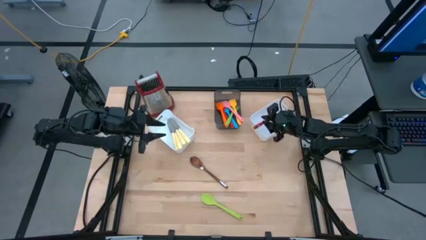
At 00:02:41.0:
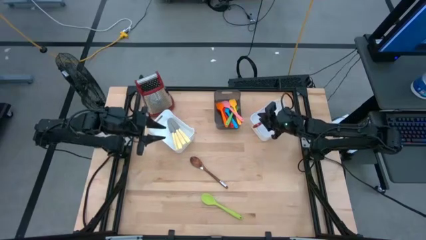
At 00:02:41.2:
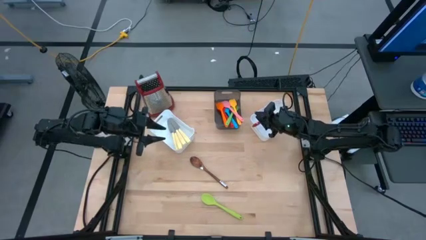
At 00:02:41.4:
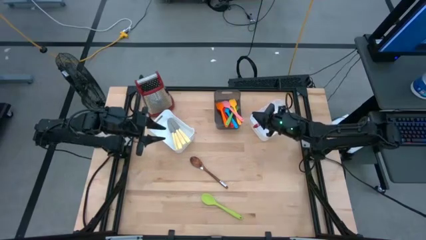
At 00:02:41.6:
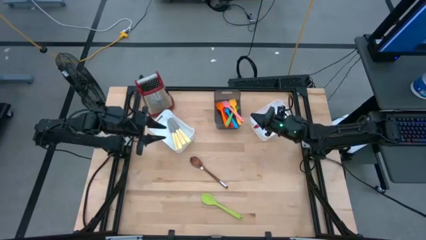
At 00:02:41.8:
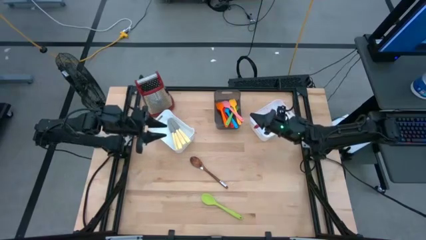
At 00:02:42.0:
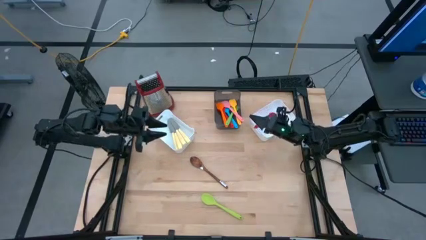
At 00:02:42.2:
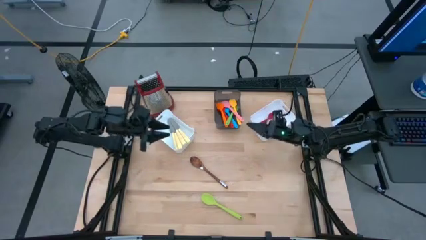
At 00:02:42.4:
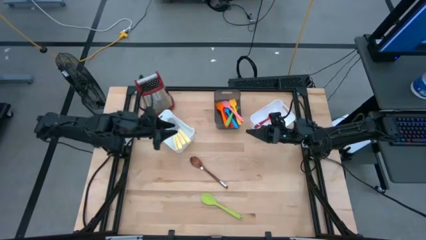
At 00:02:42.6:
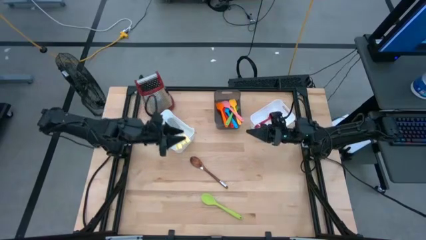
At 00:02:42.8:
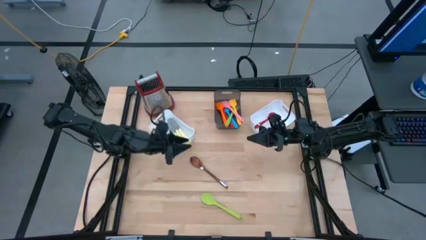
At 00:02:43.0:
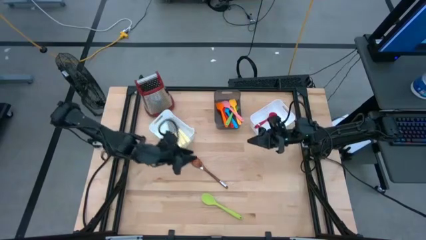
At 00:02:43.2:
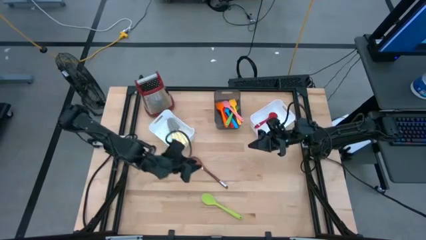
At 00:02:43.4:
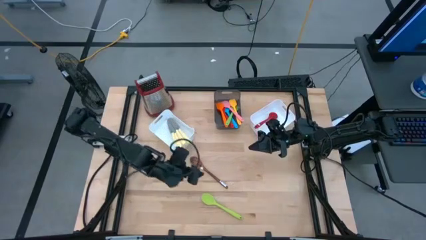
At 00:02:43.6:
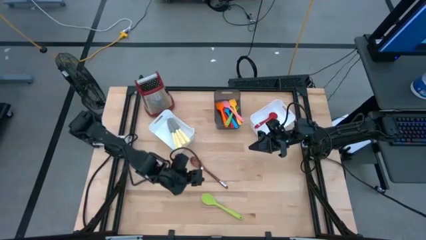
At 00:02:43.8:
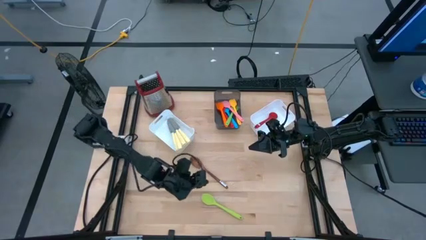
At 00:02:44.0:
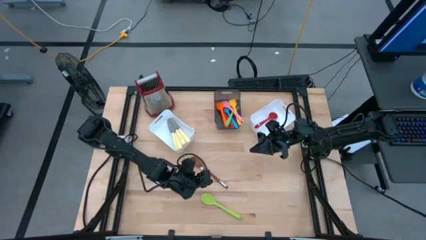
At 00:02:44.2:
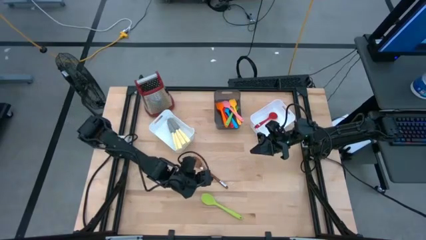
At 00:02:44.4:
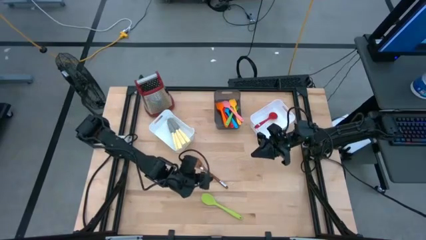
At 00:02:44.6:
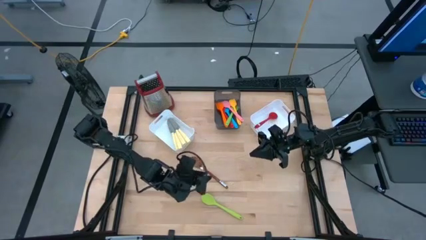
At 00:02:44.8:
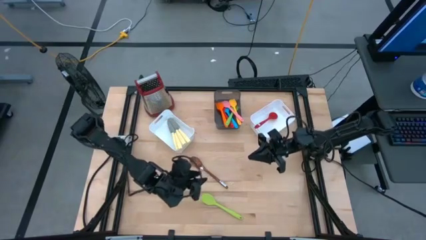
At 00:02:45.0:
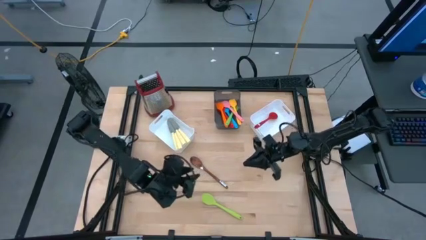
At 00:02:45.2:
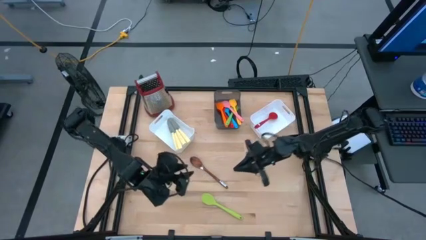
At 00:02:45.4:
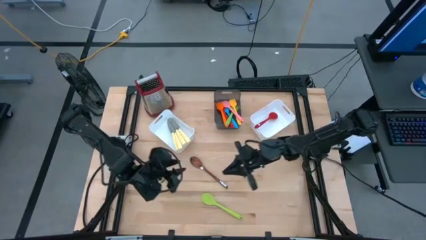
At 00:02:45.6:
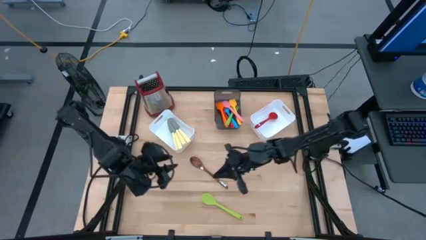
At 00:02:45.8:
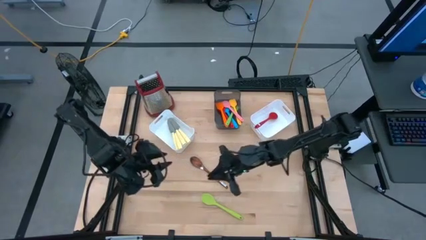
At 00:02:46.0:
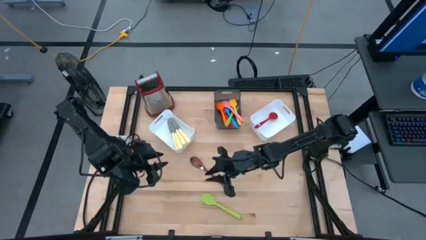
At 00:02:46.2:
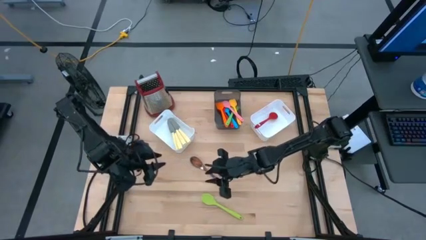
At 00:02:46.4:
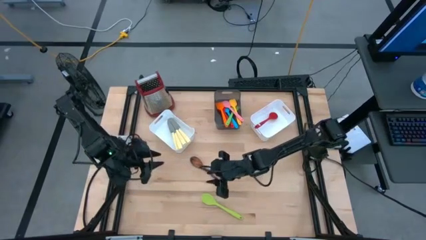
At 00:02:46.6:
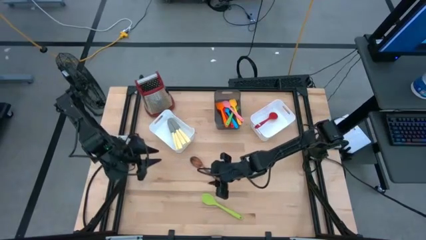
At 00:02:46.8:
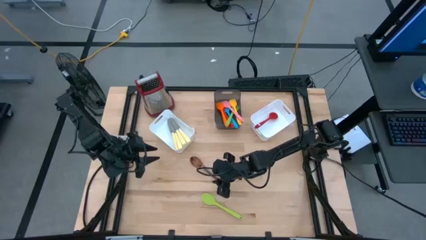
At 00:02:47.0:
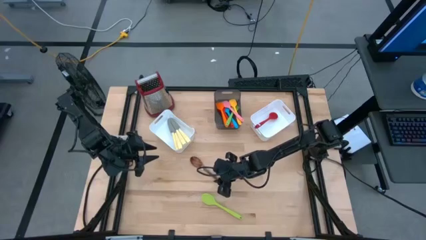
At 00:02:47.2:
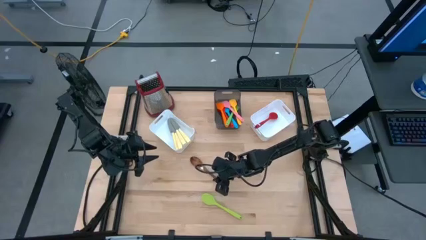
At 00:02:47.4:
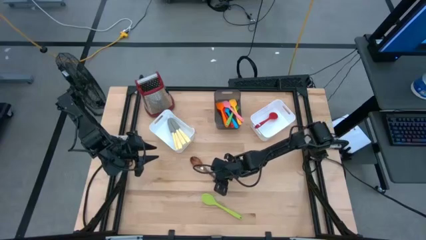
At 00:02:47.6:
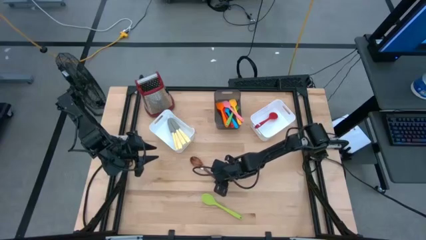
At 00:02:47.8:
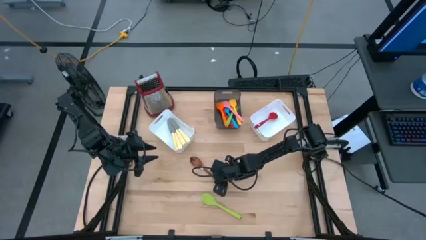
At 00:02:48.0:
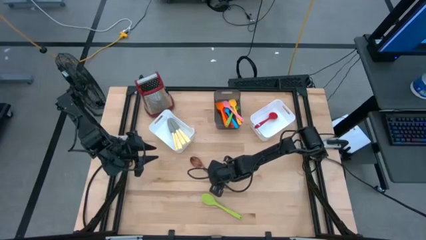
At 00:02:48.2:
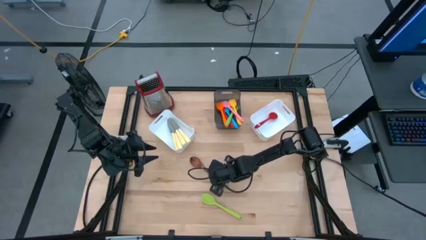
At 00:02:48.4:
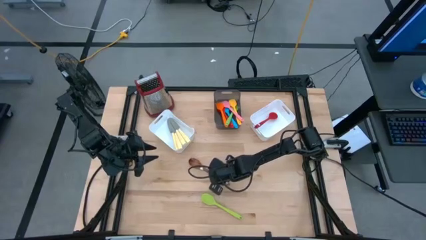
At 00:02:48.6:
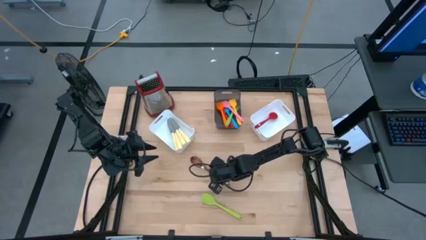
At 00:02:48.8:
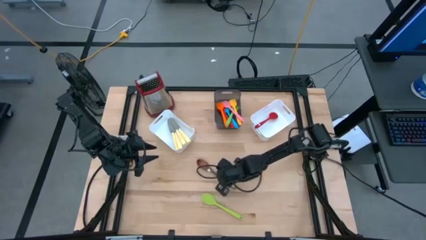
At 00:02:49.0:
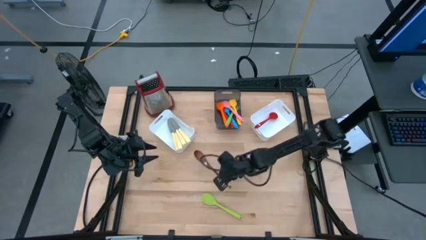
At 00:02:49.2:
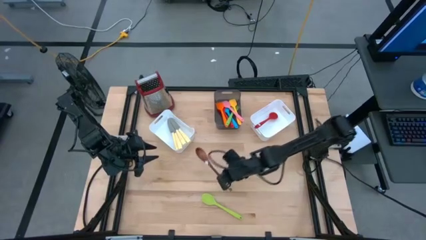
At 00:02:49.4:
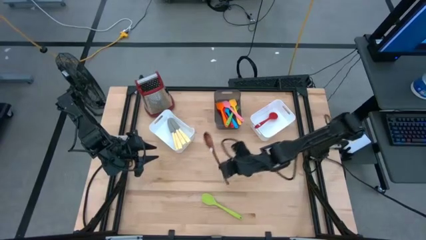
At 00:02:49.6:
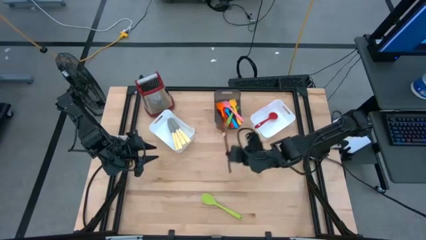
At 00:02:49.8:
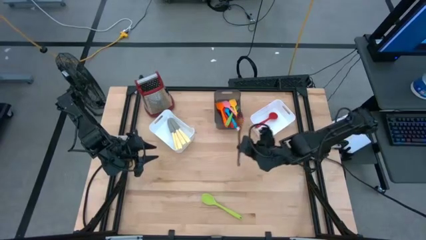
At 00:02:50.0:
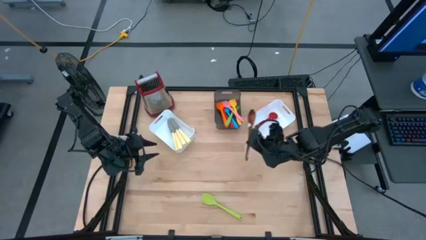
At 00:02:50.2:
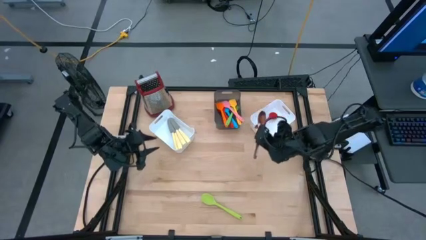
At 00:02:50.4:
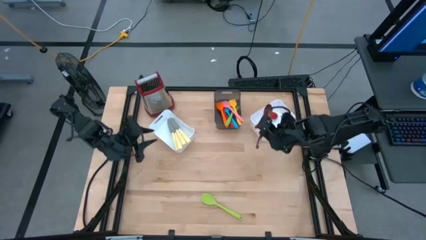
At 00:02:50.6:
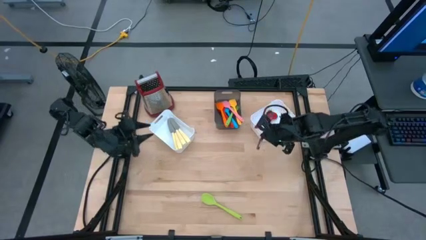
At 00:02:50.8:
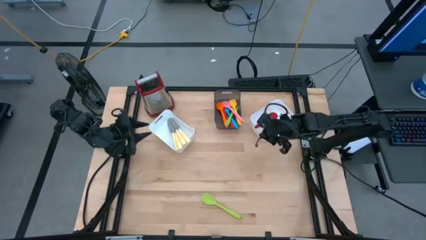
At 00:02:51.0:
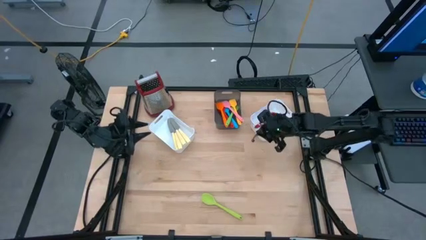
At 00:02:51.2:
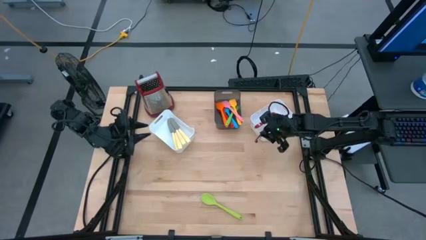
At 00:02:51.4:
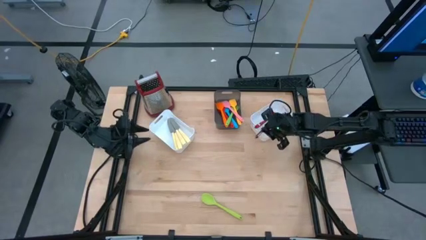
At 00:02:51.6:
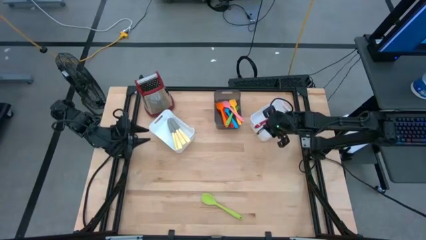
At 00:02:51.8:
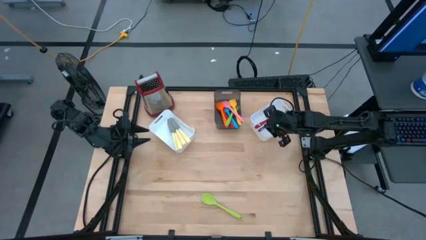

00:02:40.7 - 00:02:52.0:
Task: Pick & Place Kitchen Items
Put the brown serving spoon into the right white bin
